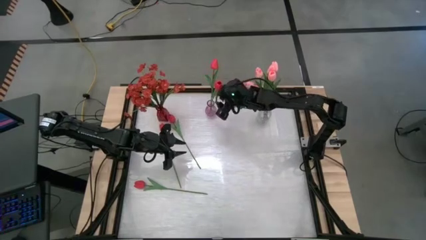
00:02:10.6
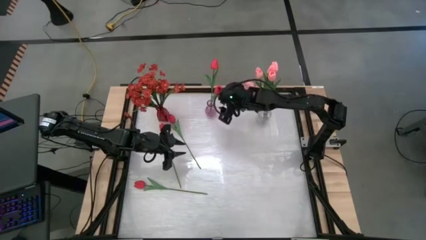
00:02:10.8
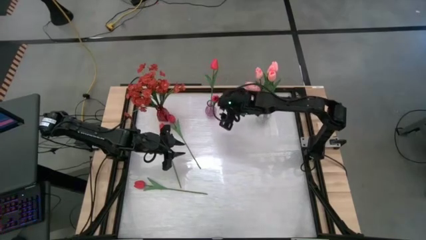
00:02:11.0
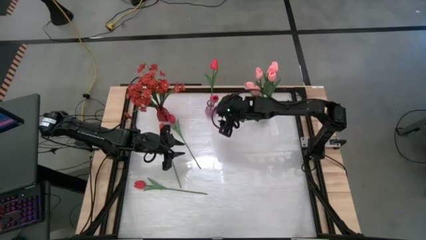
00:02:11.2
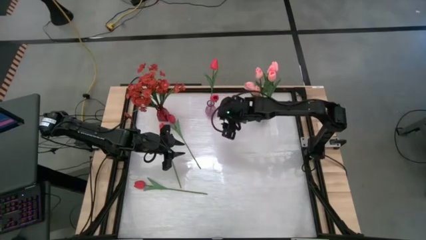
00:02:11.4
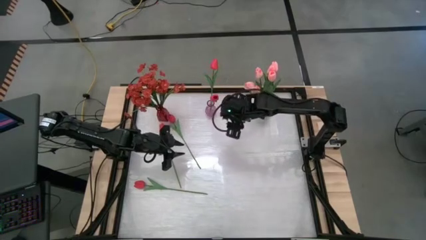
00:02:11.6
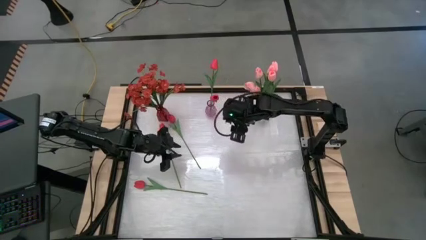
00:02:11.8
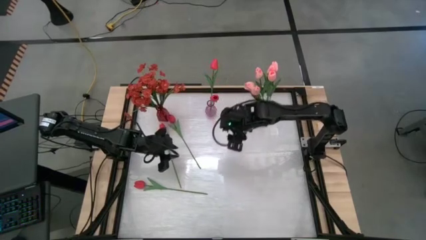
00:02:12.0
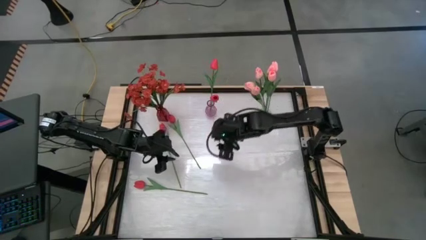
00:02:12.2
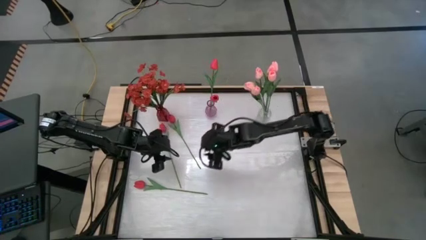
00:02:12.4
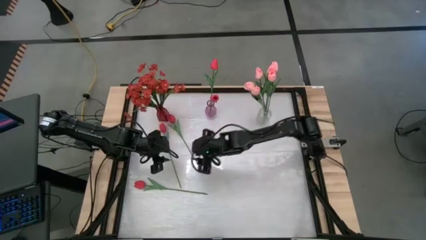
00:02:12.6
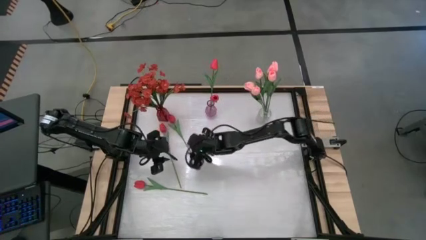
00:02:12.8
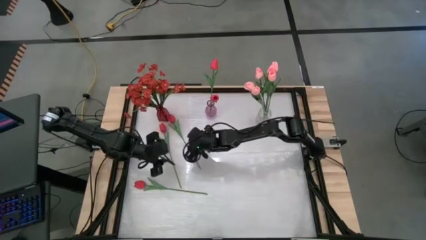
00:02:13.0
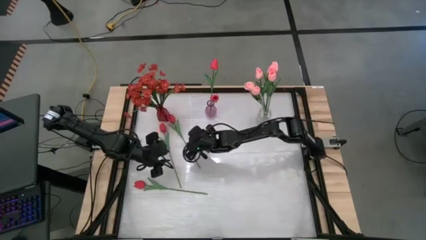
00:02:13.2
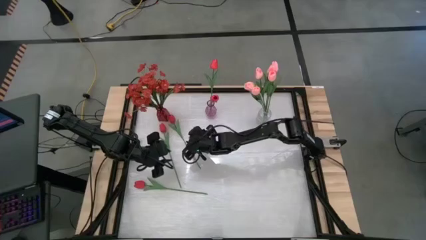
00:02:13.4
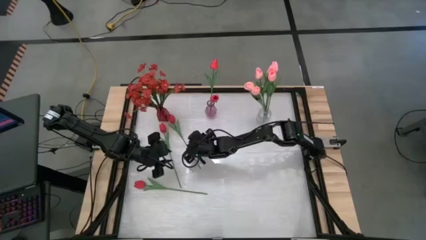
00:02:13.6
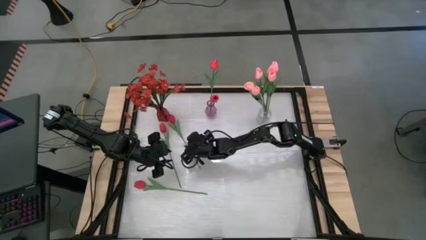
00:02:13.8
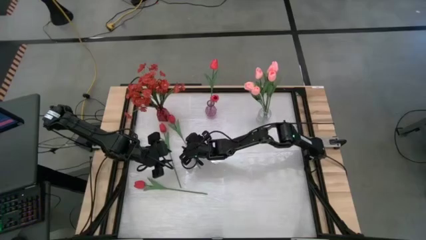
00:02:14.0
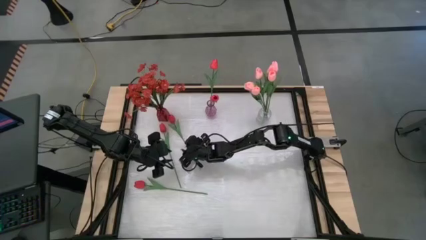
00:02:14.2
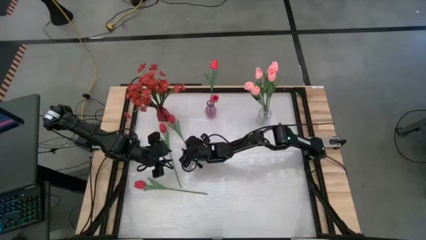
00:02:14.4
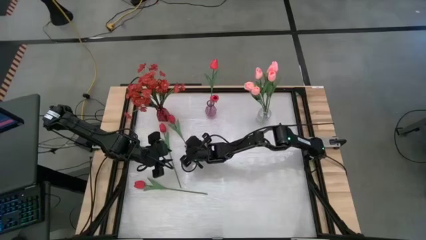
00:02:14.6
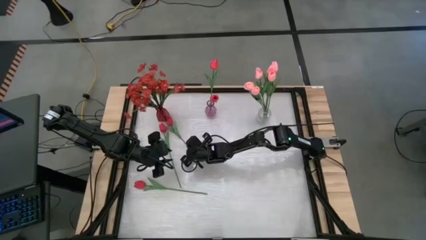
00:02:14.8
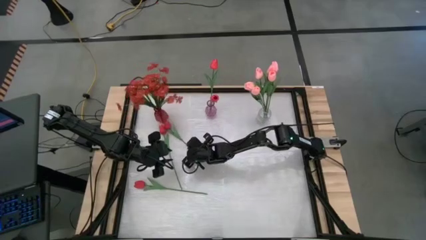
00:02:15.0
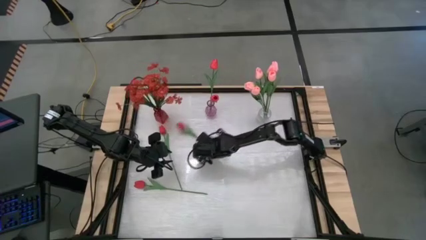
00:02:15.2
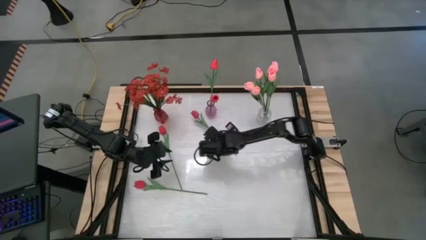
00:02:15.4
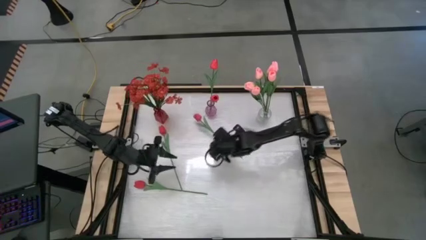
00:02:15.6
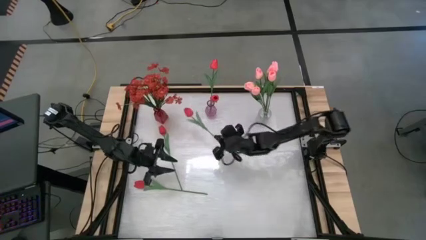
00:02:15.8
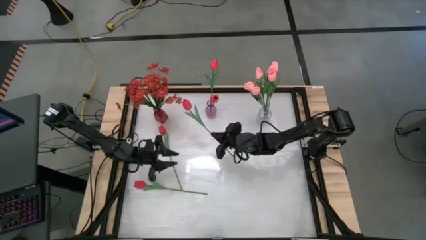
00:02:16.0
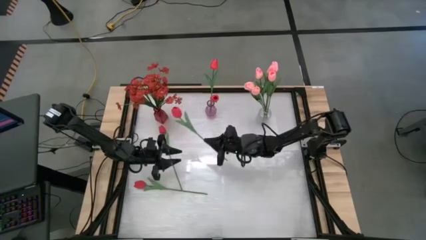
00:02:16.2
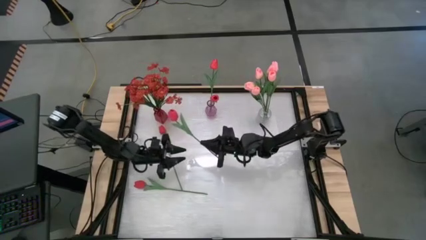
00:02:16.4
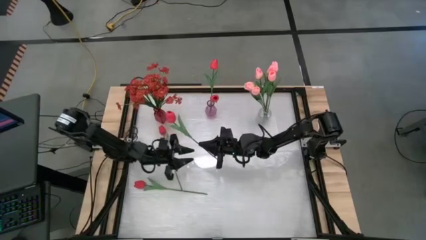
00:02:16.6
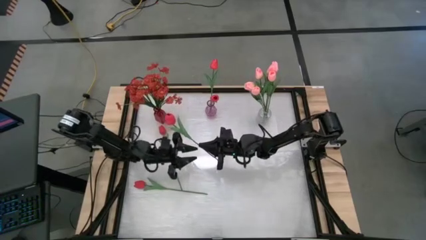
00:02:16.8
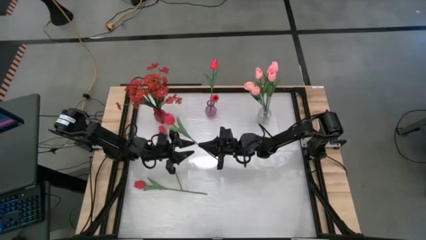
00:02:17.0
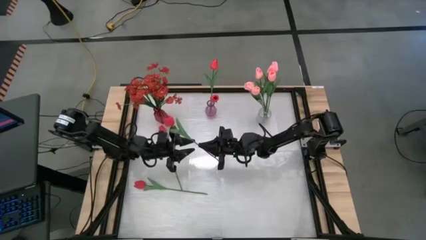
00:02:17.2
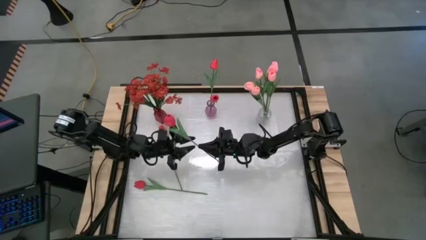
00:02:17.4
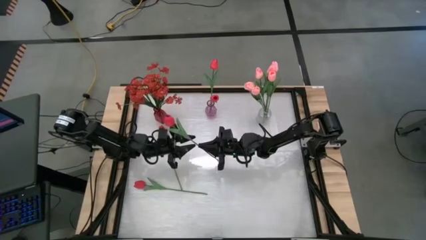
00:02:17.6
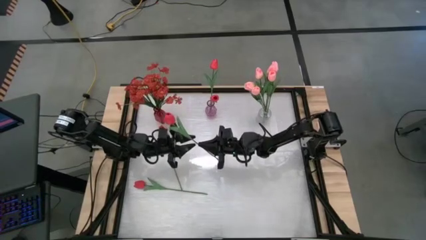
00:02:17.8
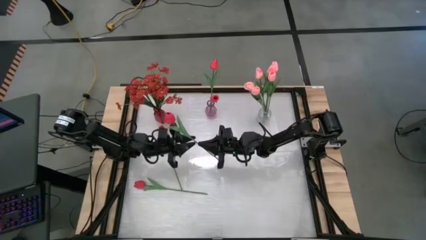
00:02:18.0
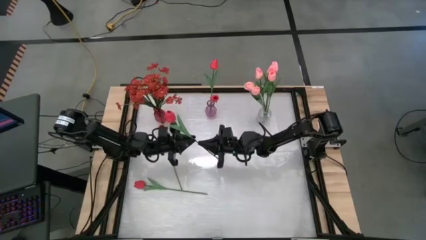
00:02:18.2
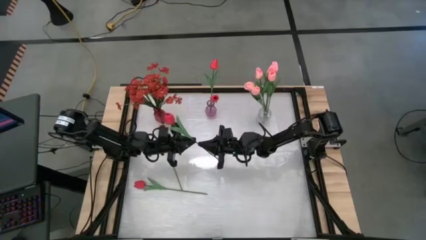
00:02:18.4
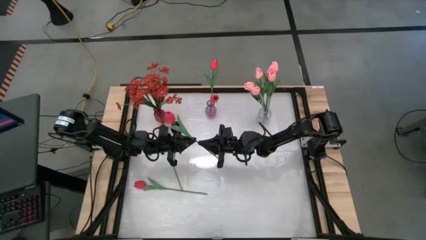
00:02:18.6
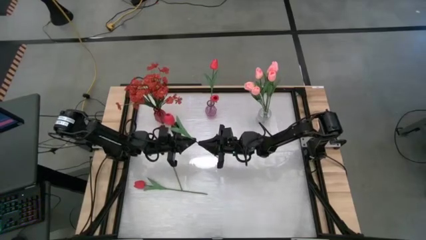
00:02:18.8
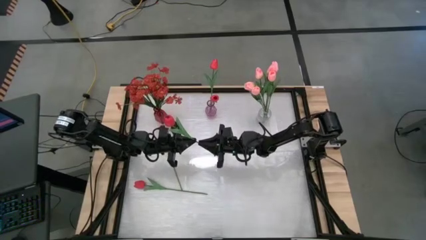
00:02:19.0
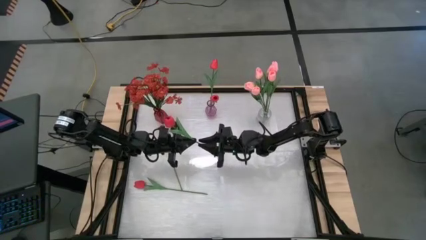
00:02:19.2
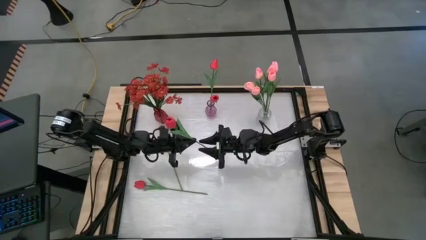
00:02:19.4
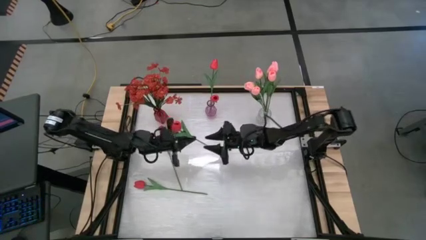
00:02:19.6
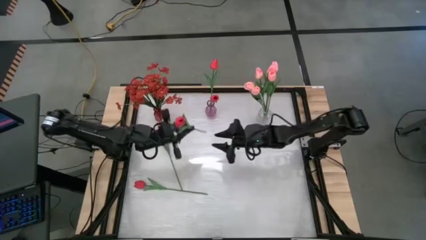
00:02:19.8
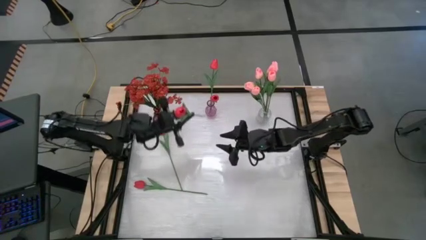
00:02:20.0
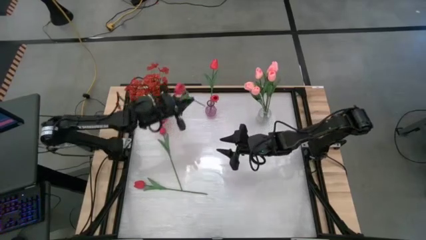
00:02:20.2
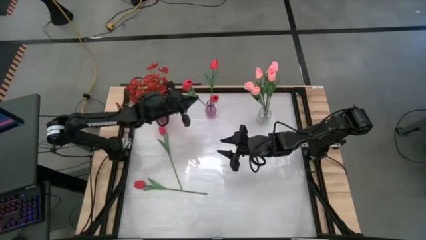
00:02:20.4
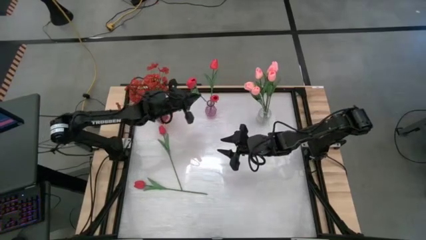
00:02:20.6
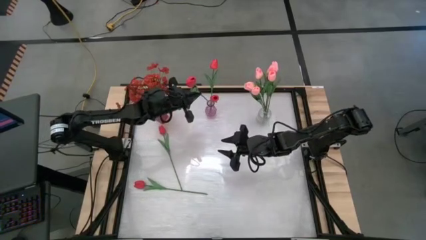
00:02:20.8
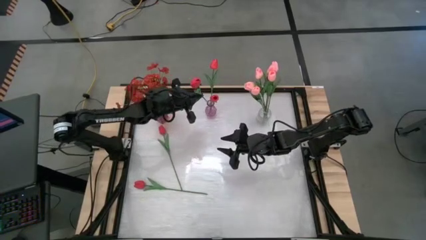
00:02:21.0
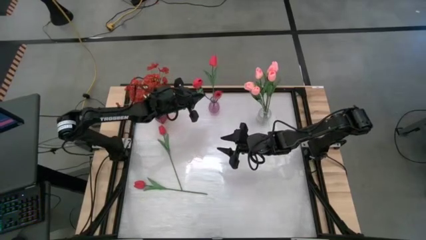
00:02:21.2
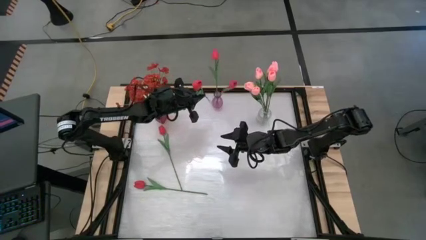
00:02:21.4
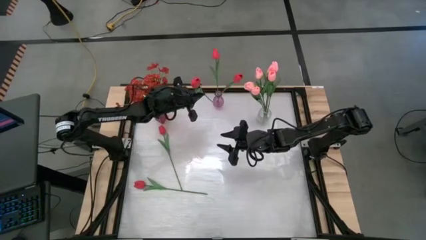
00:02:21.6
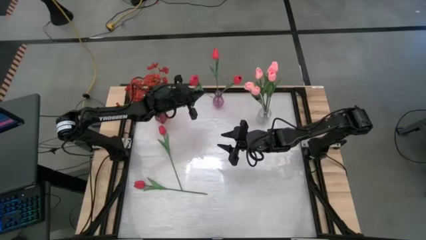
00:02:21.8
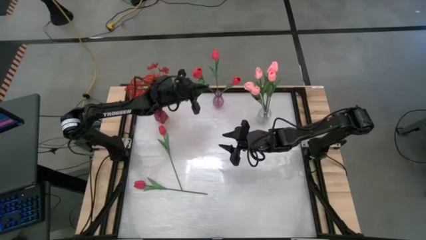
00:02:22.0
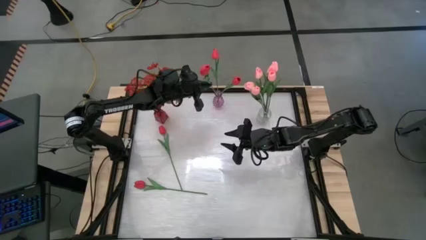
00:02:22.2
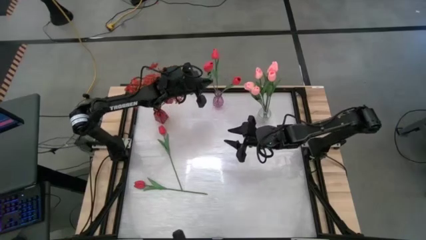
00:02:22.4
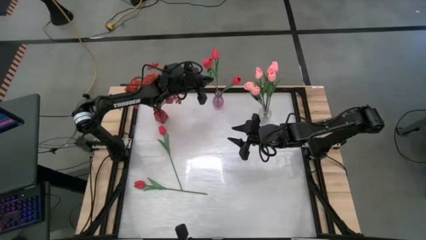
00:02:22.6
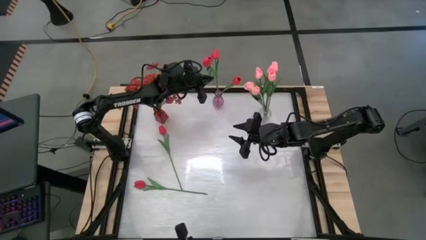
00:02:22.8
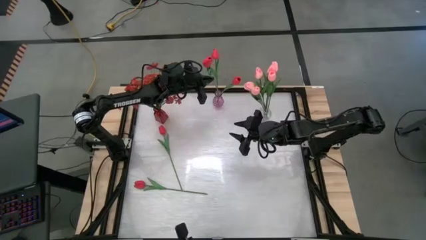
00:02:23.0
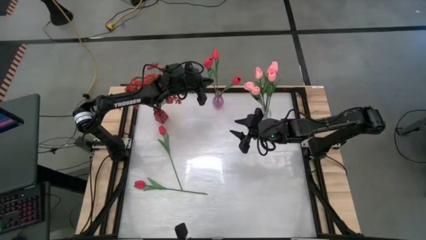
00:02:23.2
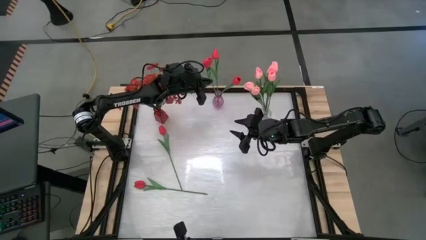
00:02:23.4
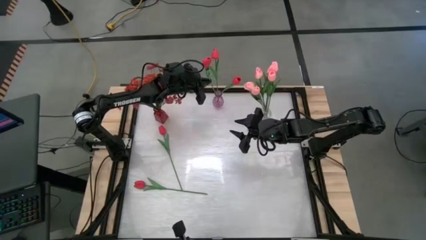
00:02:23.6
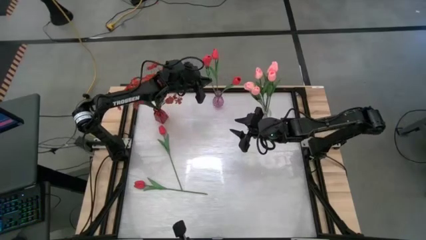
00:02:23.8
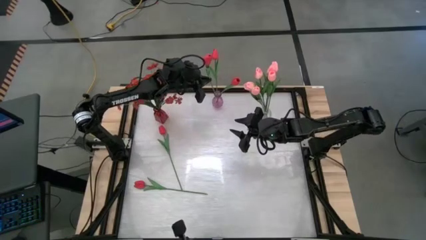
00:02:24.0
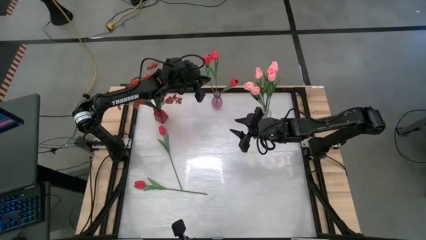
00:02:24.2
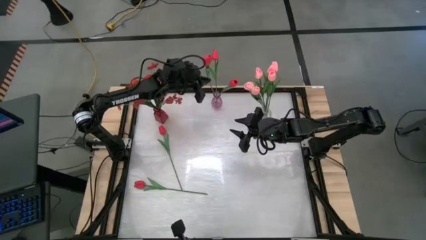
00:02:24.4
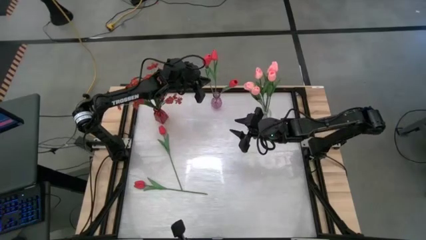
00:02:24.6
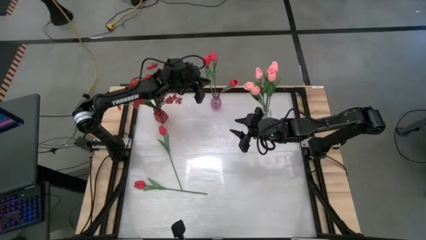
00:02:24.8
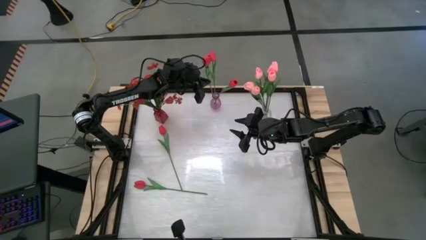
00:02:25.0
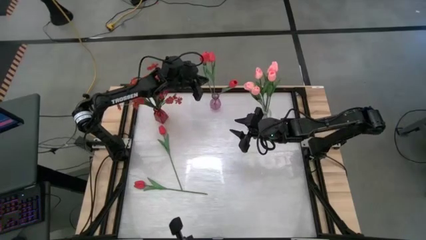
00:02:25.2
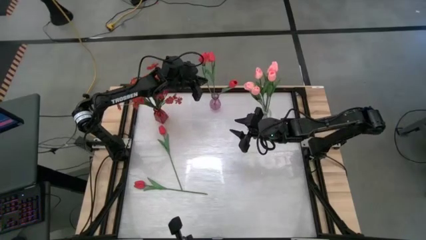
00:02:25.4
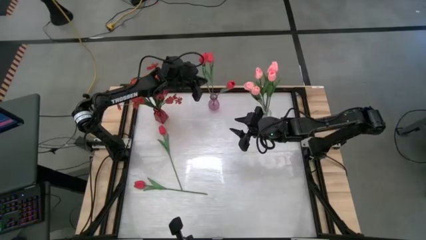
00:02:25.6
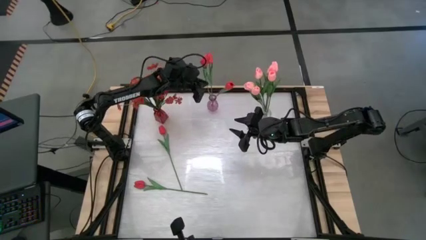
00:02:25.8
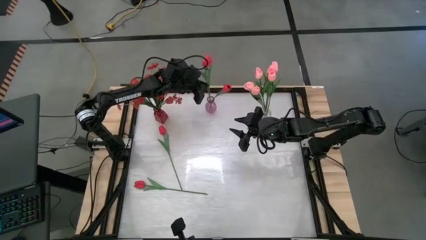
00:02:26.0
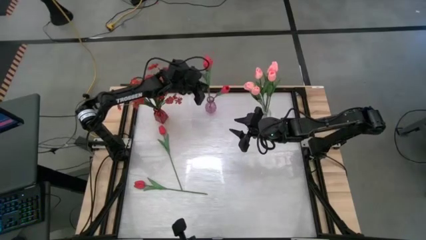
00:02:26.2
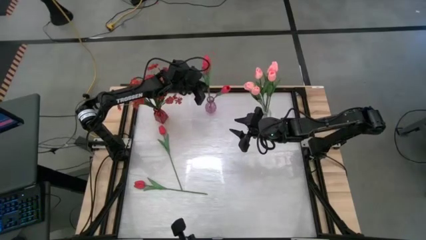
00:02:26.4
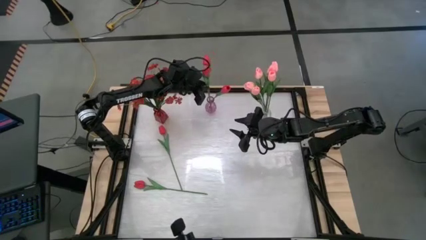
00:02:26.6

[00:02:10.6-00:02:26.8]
Task: Sort flowers into vase by color
Put the top right red tulip into the purple vase
